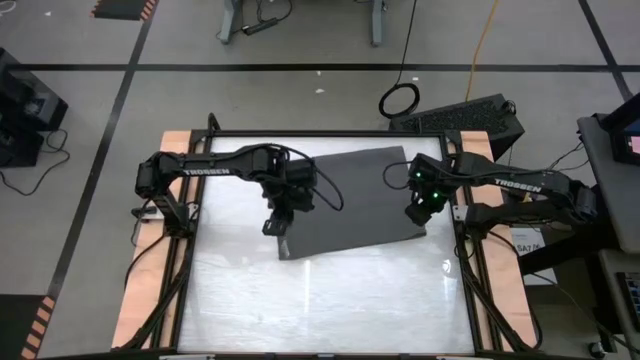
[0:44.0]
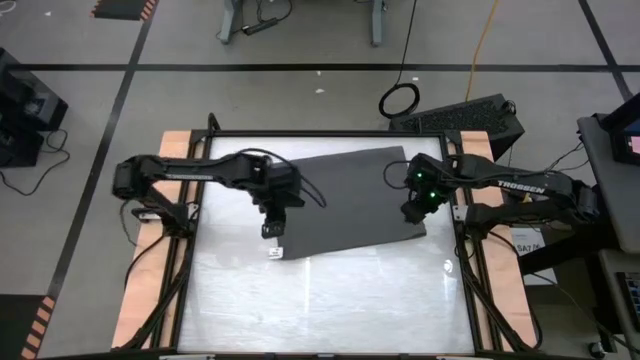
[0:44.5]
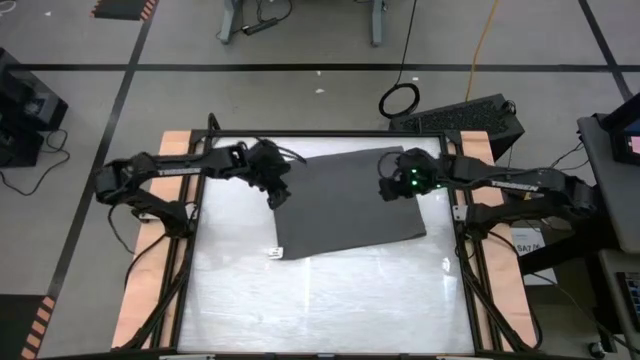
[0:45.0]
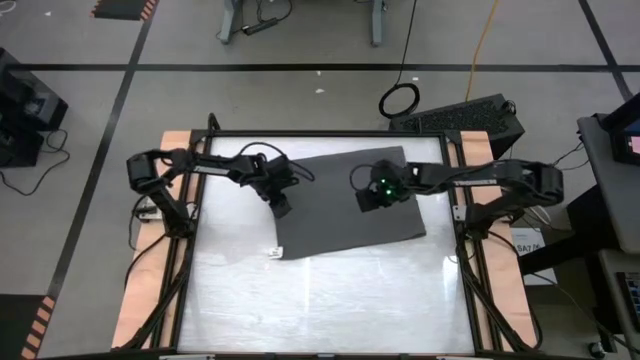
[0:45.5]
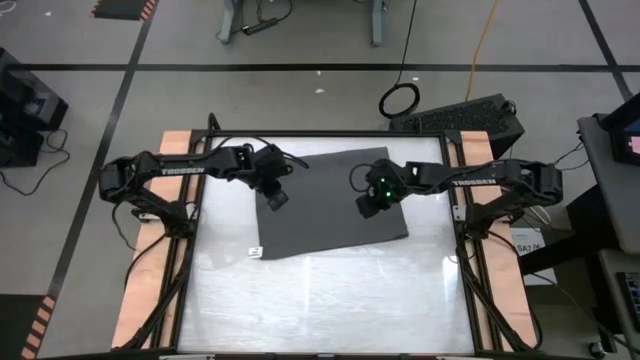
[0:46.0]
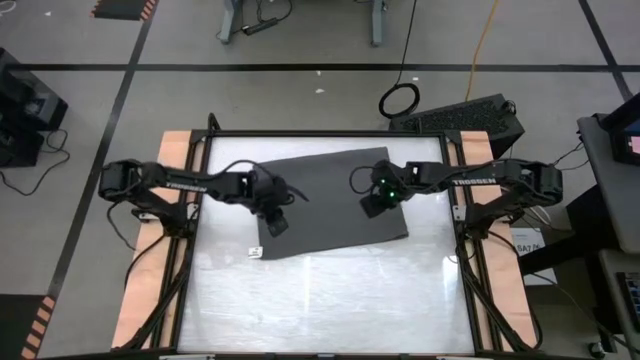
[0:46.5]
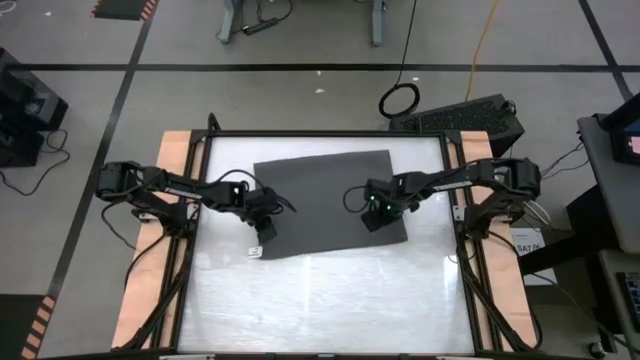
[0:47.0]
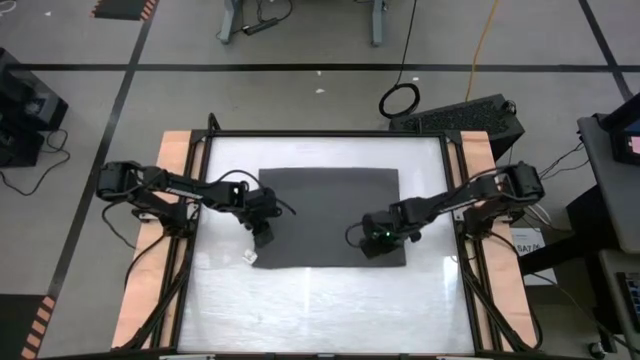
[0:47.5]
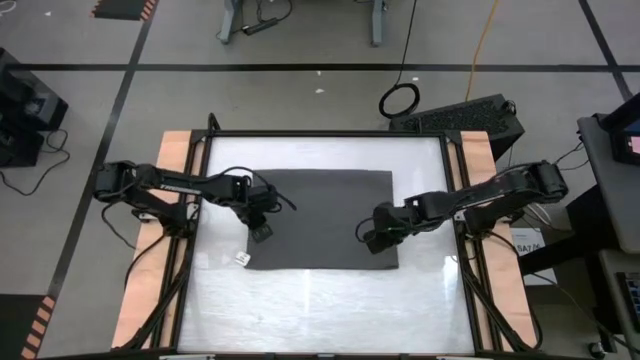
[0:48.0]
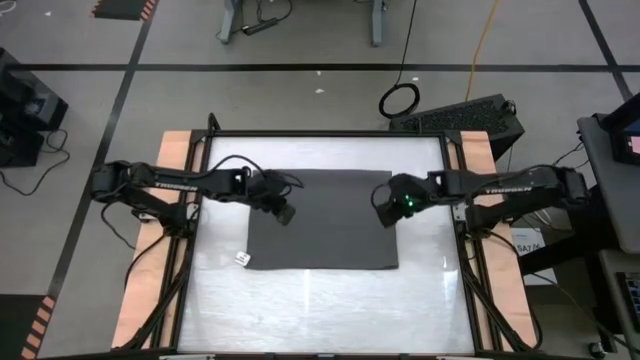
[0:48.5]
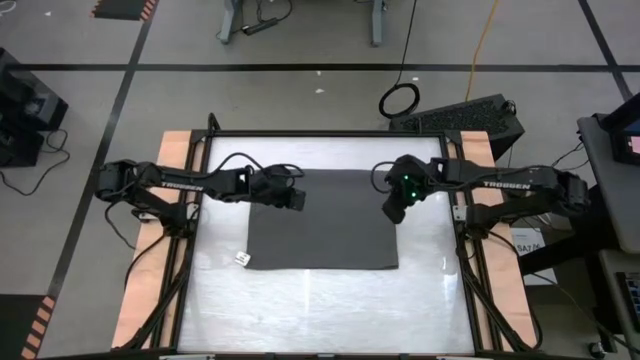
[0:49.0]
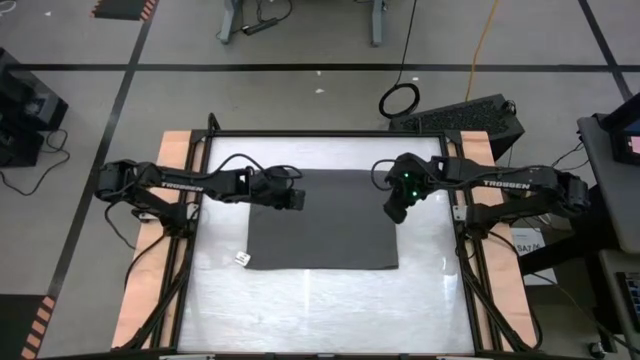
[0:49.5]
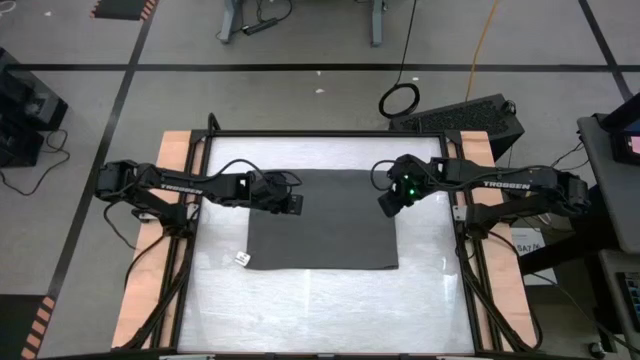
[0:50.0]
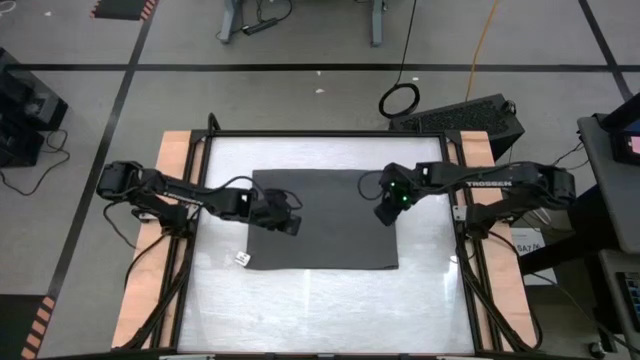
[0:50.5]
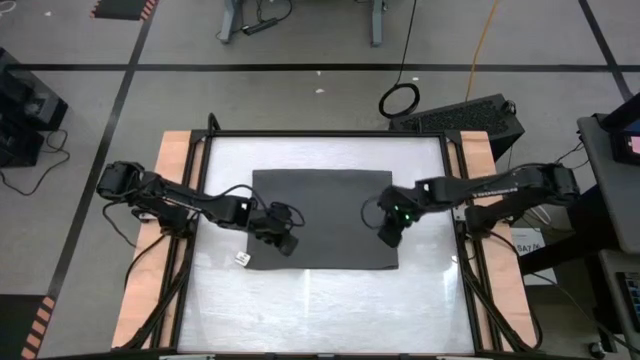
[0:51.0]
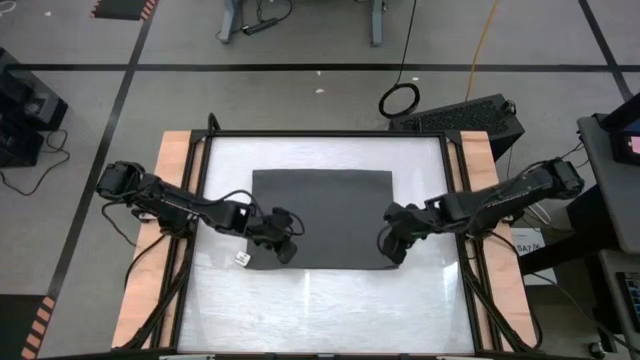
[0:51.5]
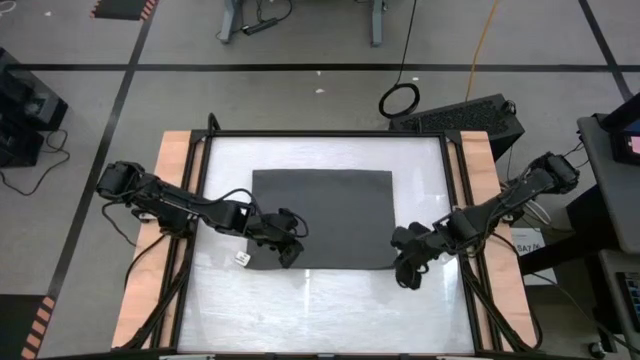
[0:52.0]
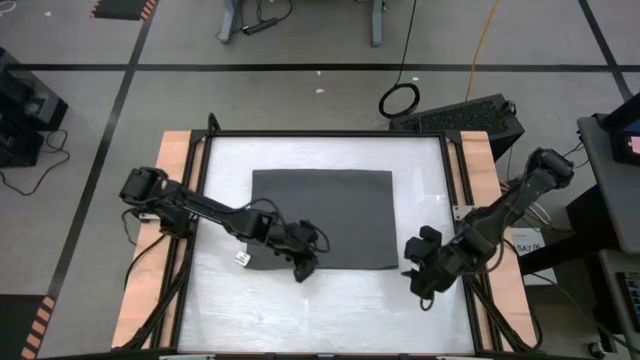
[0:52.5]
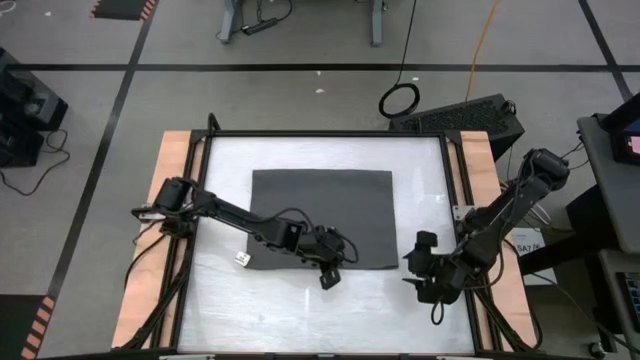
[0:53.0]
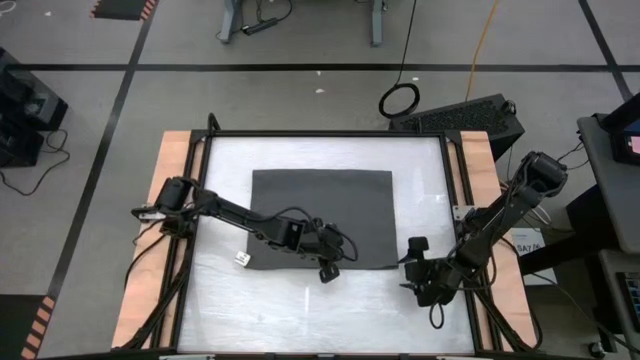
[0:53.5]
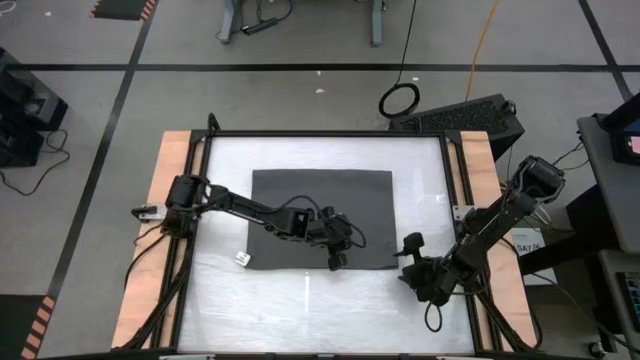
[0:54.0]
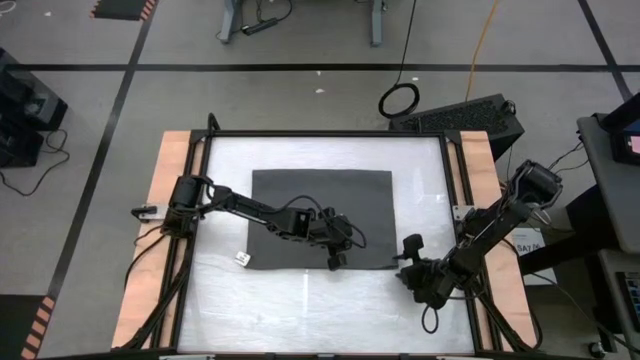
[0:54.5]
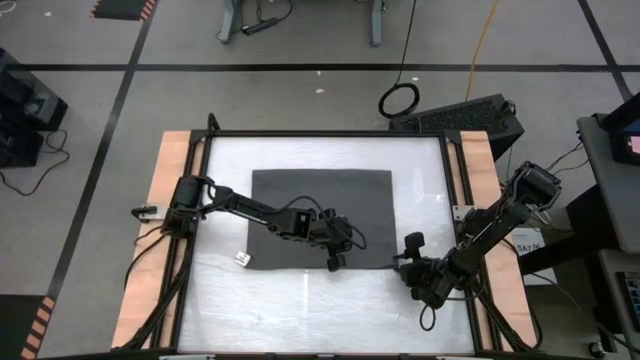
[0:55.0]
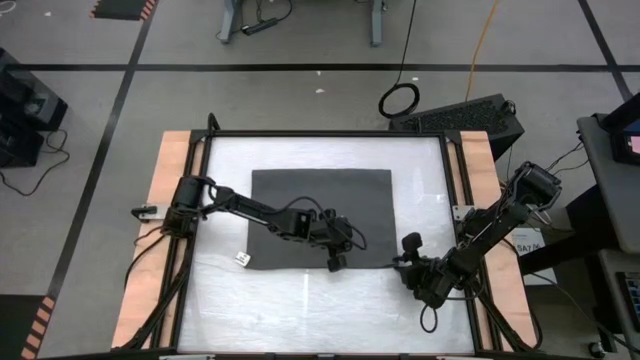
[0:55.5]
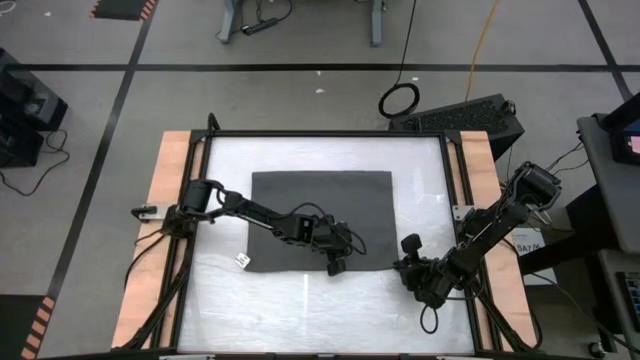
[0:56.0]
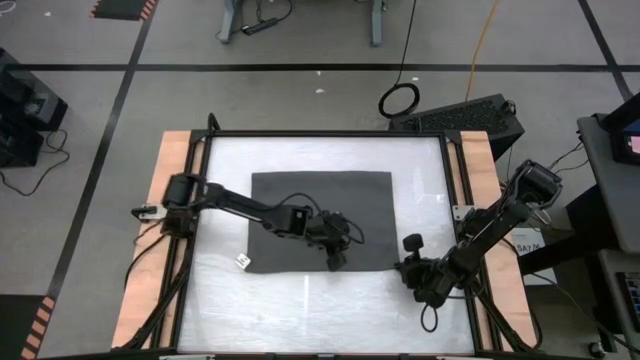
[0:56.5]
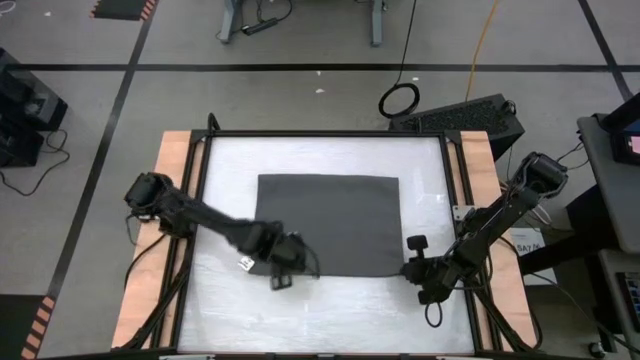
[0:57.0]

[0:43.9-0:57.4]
Task: Roll towel
Roll the gray towel

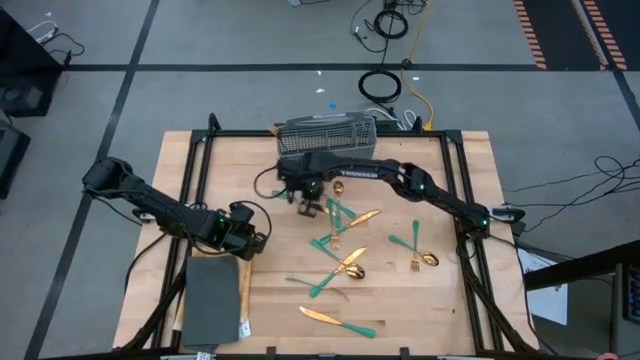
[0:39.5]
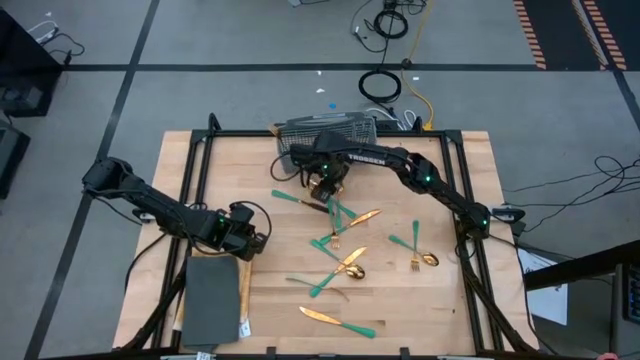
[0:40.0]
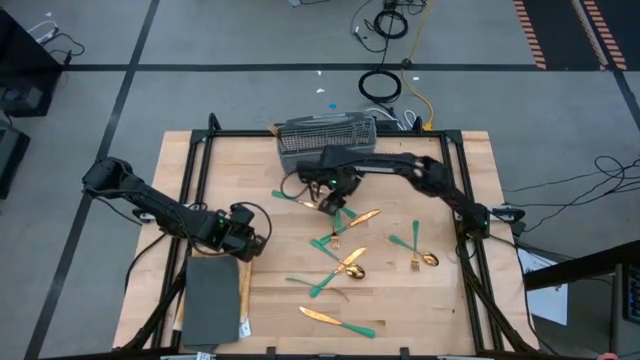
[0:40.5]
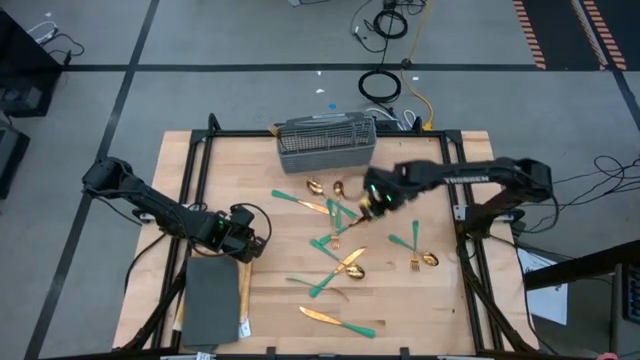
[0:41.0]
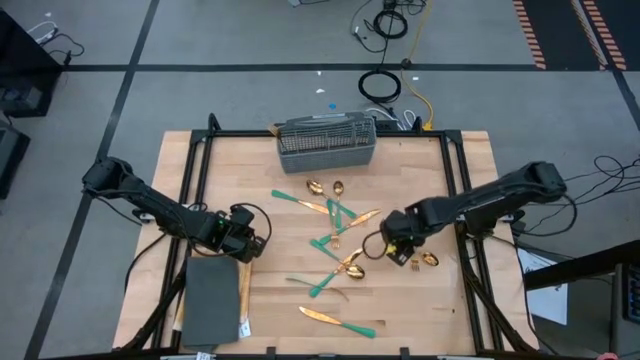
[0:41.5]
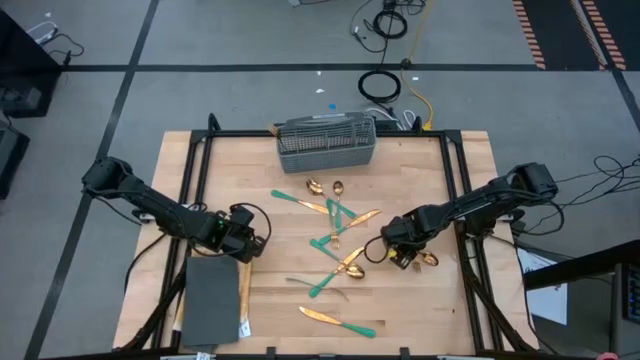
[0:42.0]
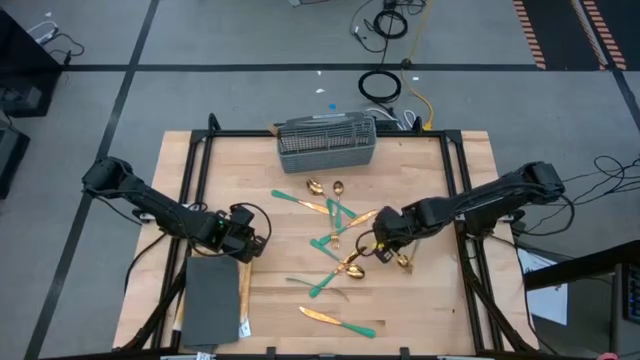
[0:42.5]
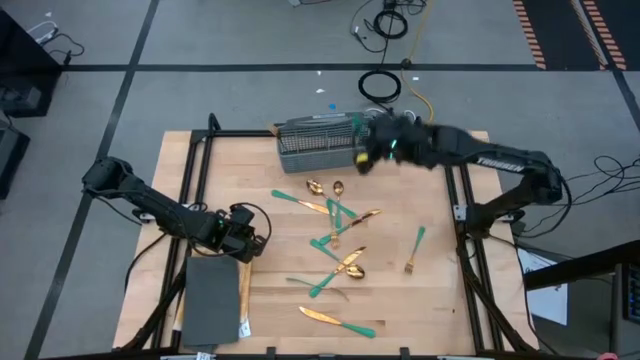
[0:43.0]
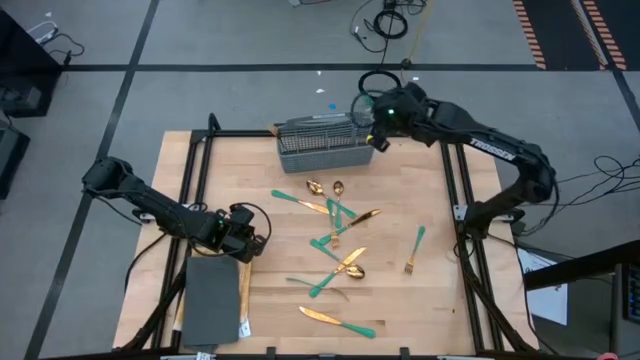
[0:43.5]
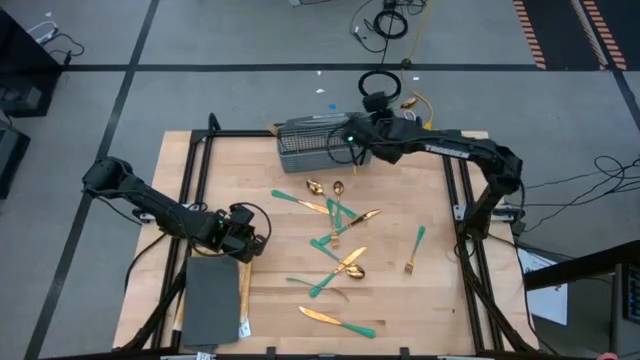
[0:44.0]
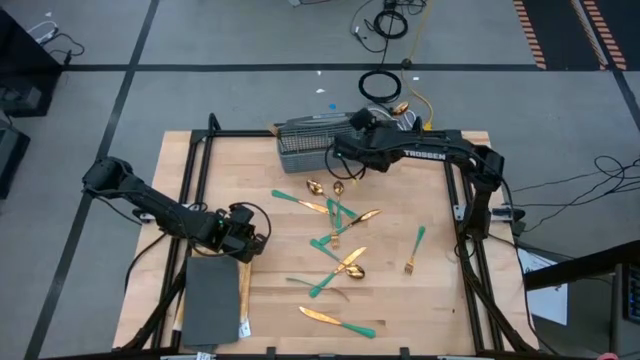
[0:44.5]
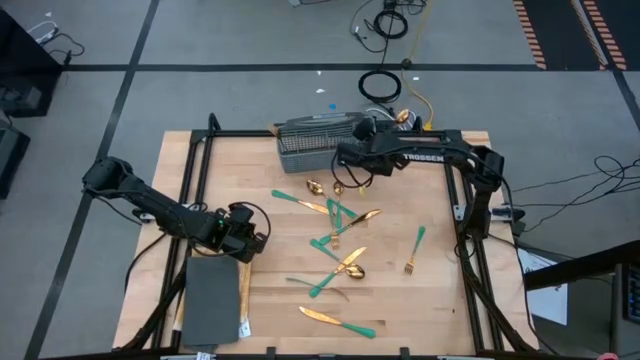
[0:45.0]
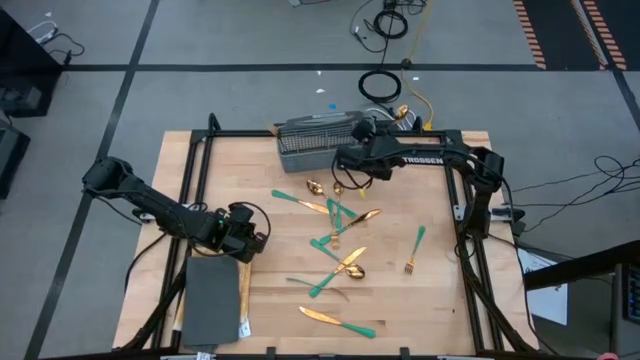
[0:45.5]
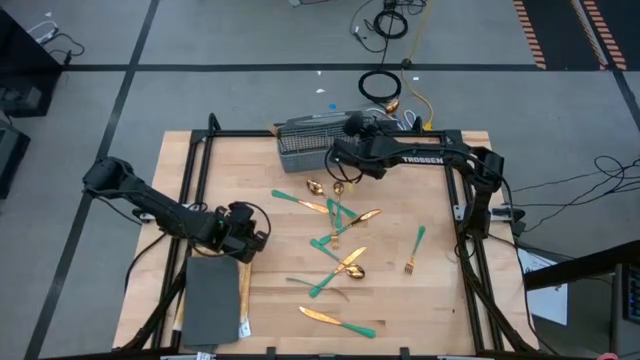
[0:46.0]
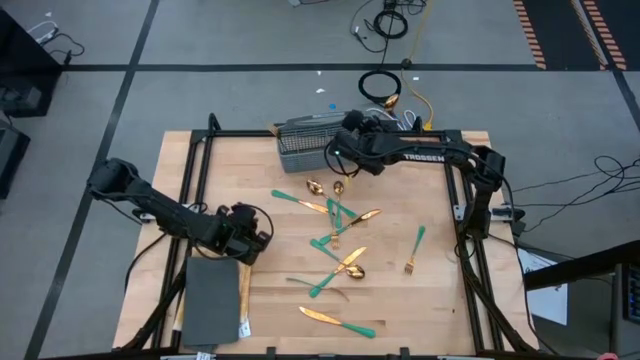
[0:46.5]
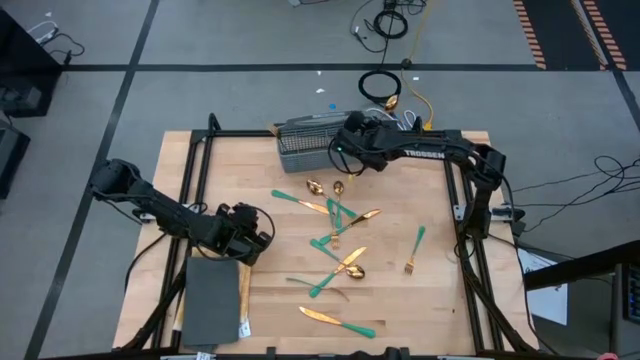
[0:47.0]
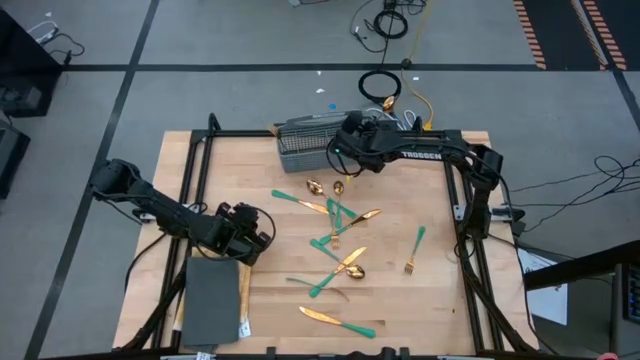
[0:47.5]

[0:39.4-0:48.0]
Task: Sort silverware
Put the green spoon into the silverware basket
